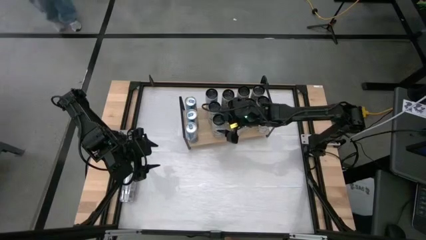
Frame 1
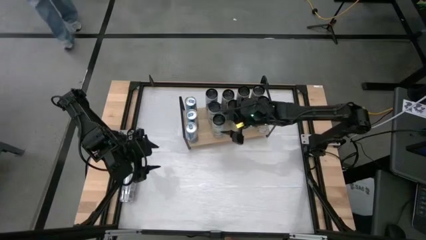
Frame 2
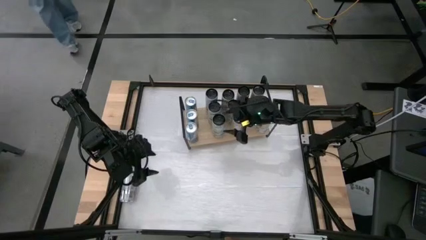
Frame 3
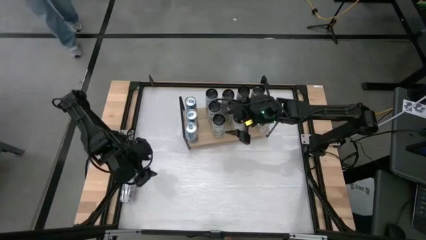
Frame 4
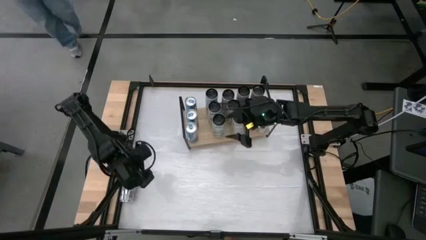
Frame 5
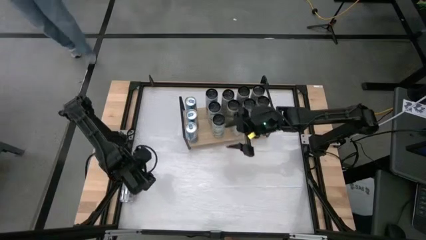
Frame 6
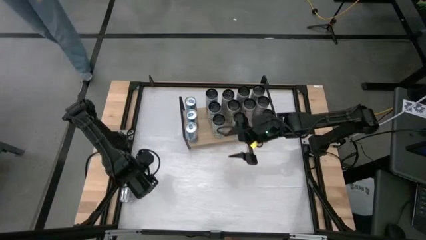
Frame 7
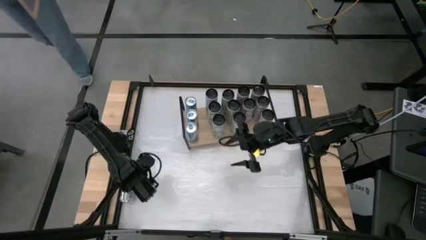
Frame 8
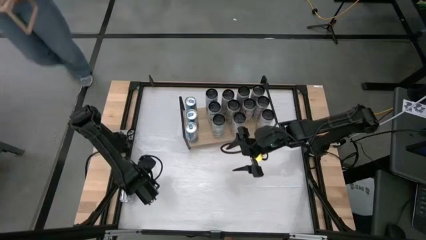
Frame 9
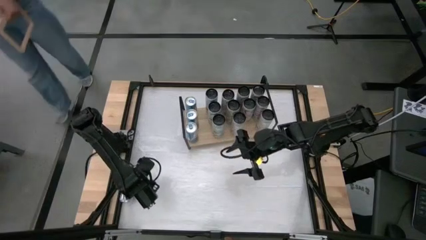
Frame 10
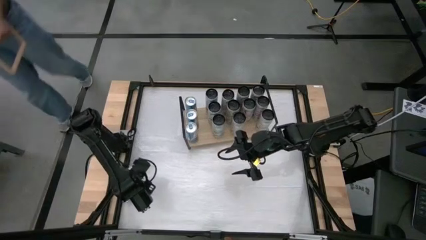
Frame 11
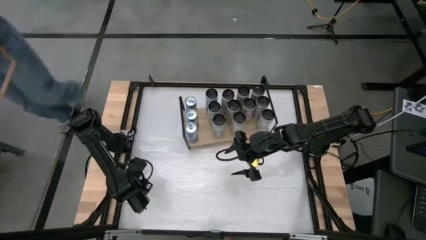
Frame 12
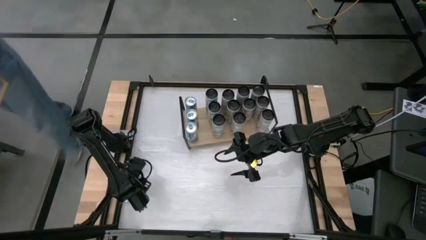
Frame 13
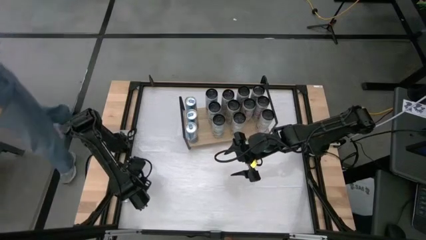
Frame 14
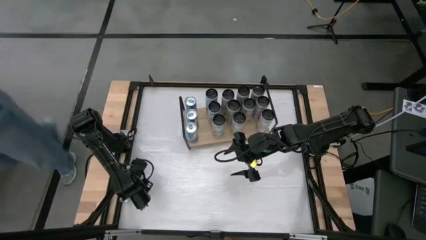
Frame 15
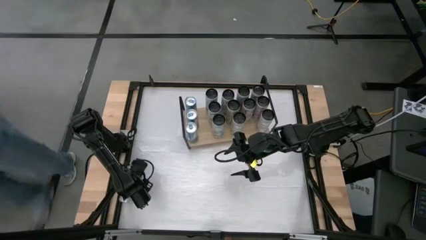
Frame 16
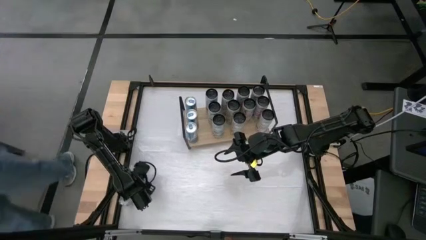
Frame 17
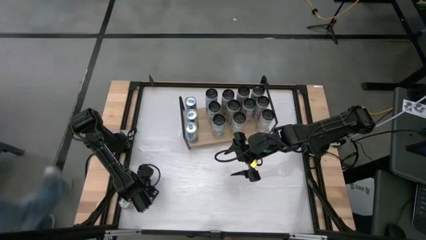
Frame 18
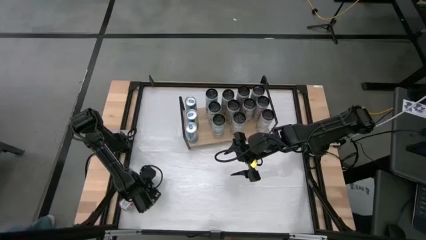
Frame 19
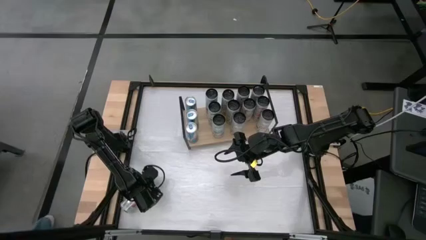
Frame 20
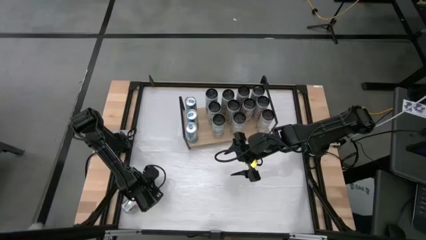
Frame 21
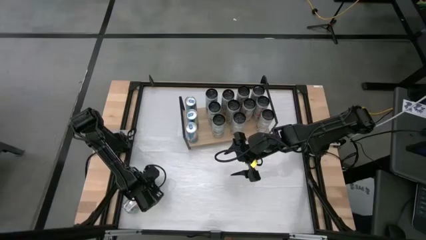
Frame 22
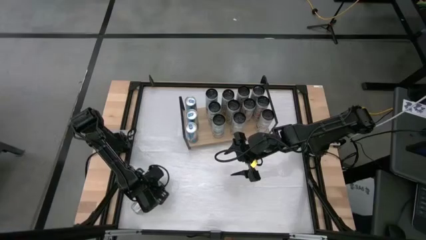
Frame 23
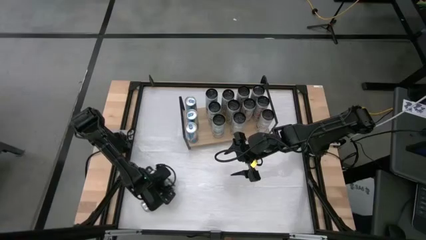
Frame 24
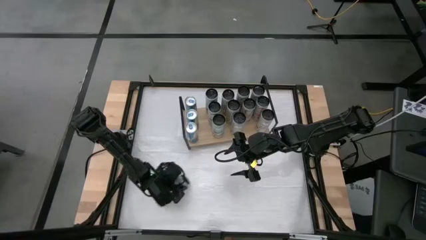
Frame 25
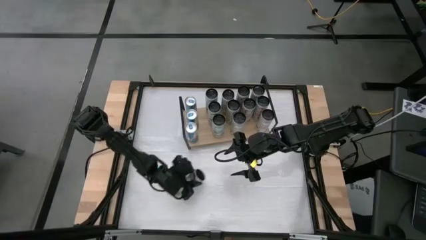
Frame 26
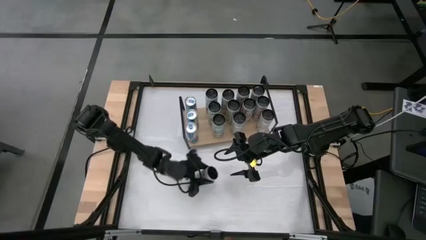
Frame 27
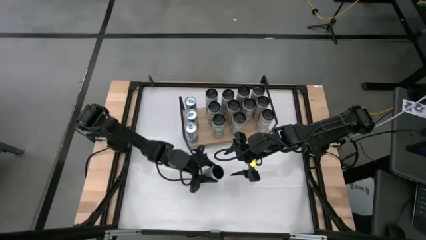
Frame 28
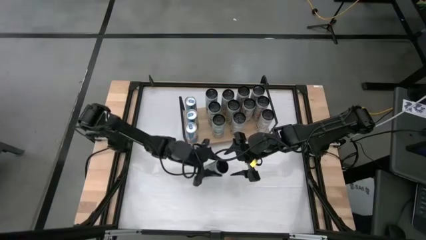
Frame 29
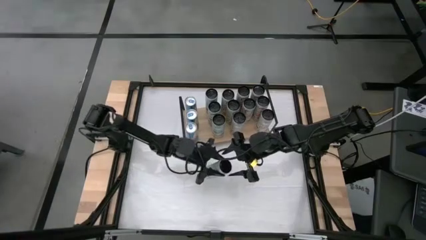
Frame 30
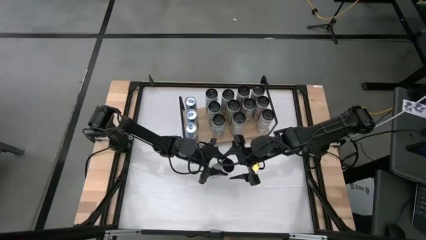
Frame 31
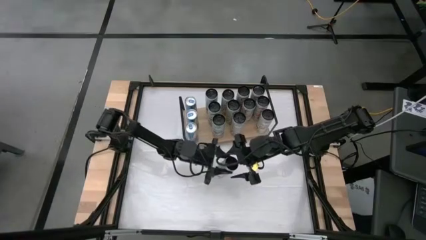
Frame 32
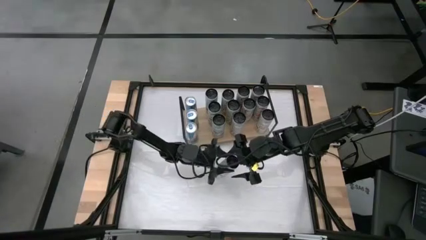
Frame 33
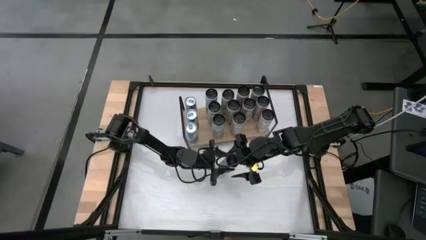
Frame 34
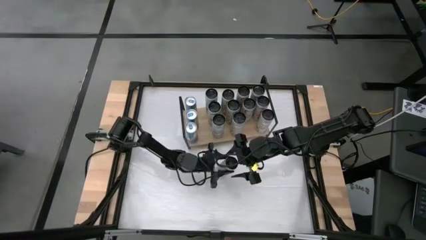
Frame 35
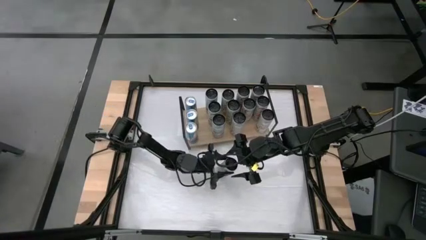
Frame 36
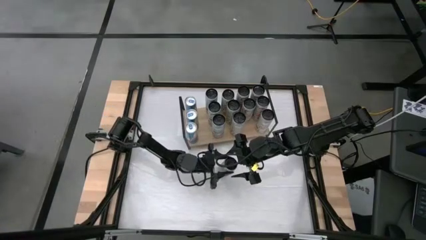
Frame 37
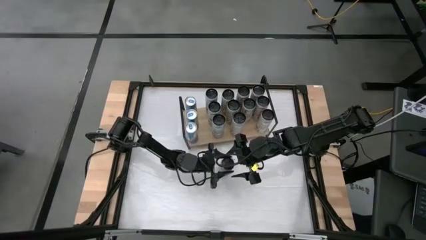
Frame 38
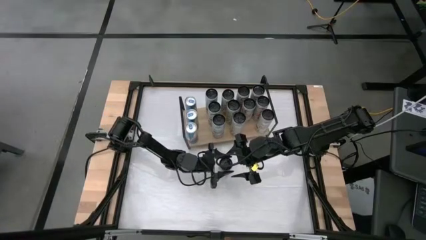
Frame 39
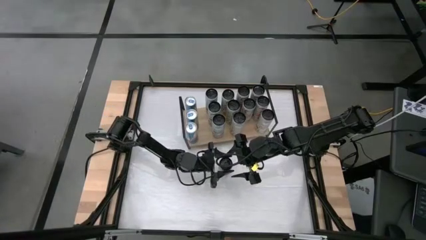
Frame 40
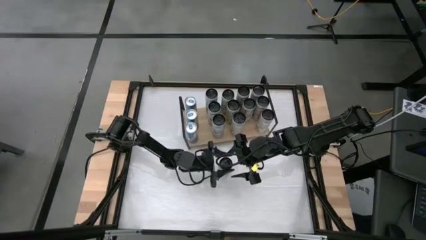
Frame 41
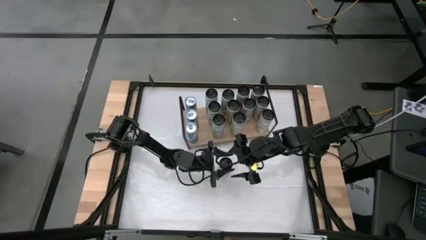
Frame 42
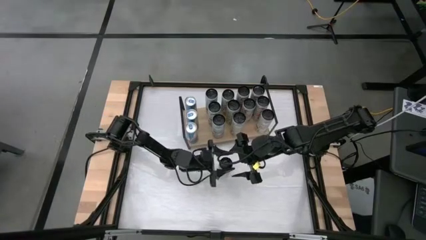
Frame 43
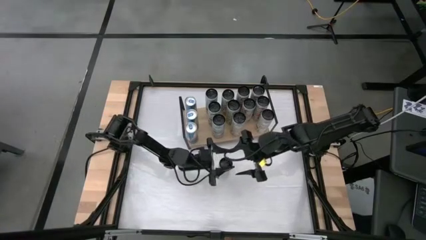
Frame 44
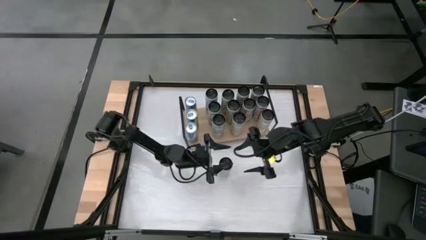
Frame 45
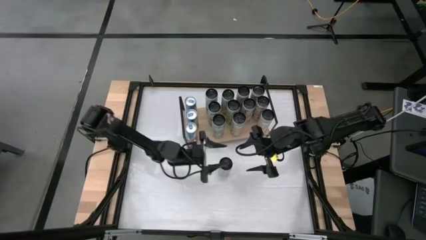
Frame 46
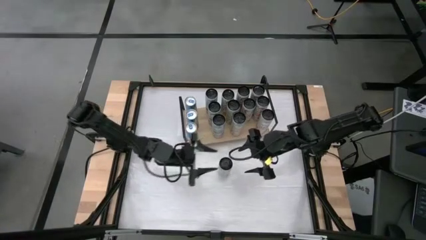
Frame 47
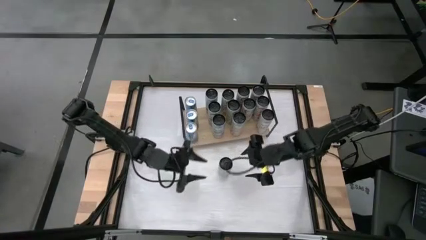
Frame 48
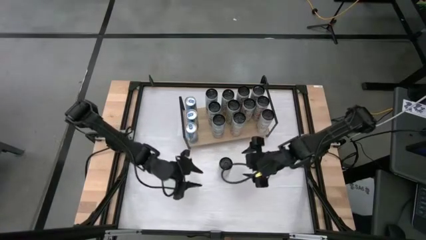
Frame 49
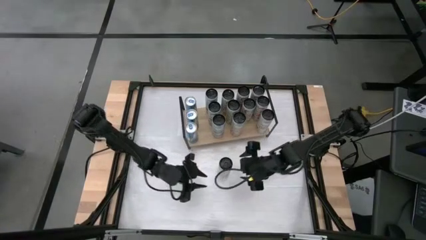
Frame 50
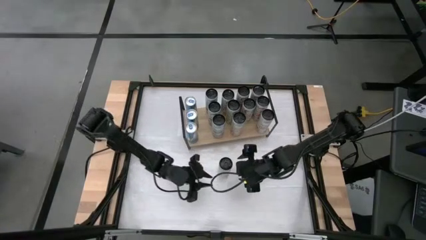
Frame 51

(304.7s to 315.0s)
Task: Place canned beverage on shelf
Put the white-pink soda can on the shelf aligned with the other white-pink soda can

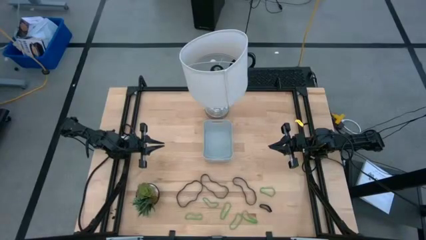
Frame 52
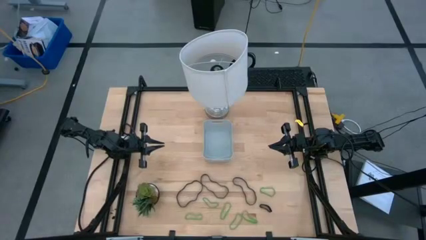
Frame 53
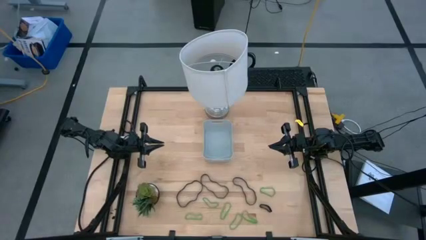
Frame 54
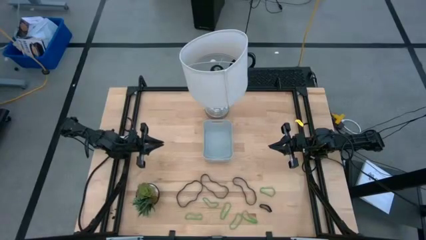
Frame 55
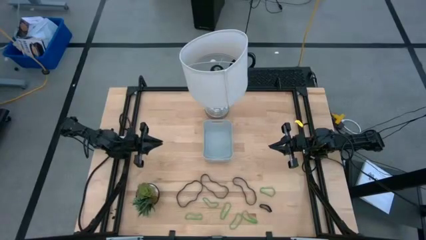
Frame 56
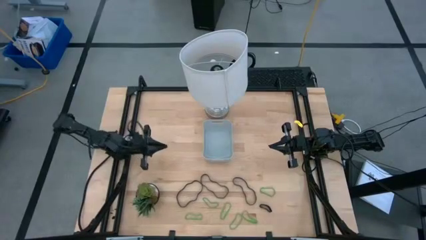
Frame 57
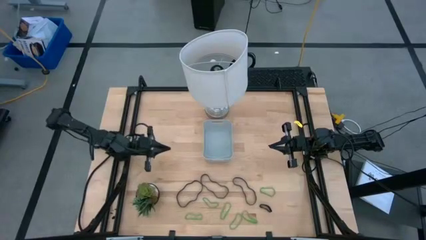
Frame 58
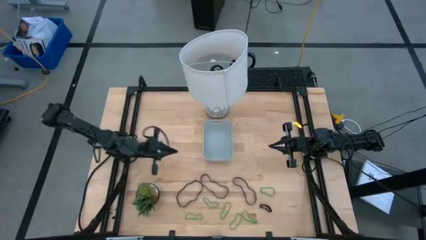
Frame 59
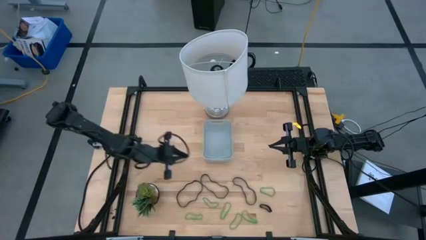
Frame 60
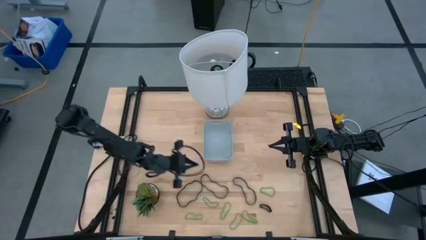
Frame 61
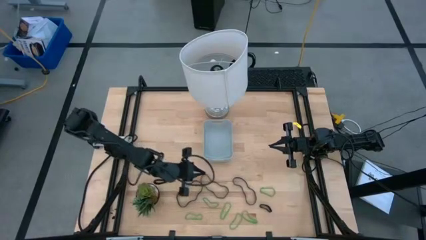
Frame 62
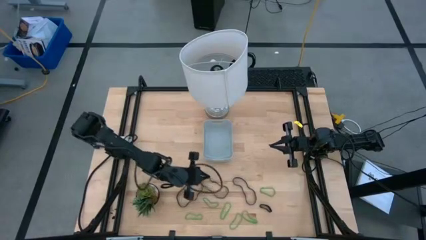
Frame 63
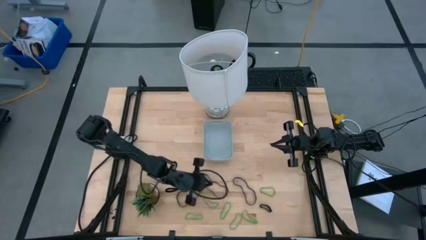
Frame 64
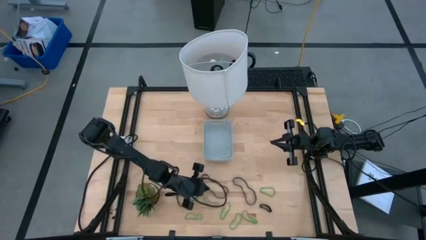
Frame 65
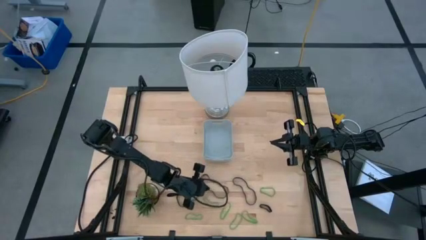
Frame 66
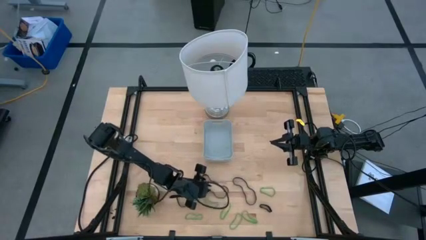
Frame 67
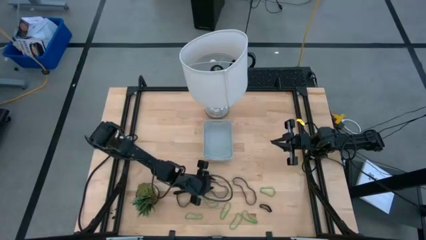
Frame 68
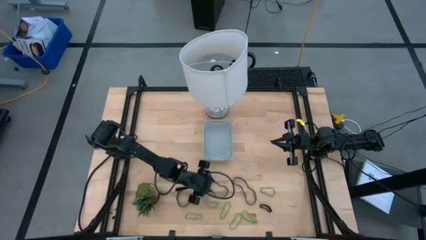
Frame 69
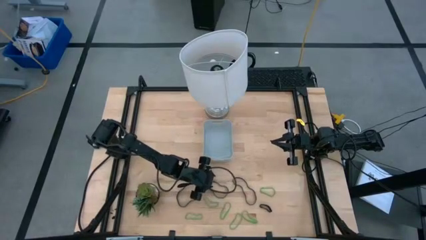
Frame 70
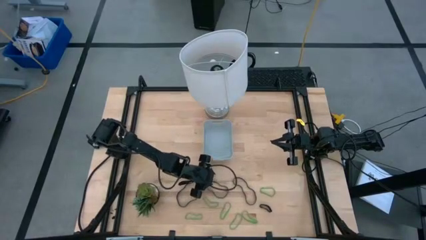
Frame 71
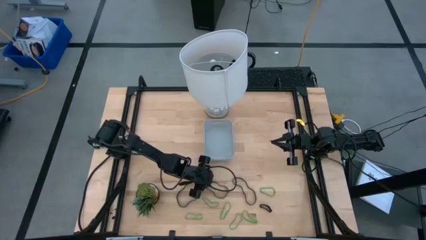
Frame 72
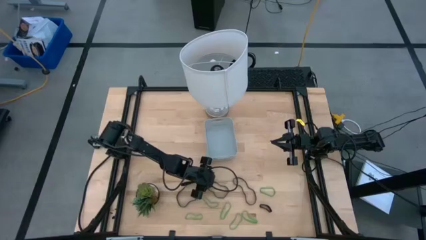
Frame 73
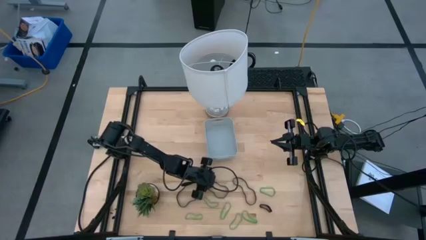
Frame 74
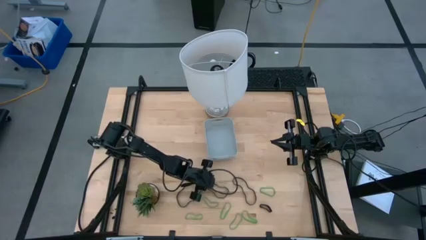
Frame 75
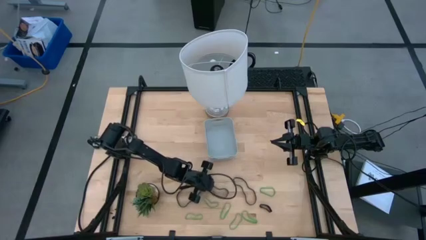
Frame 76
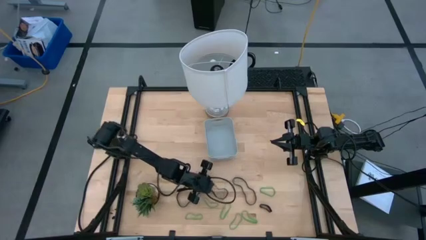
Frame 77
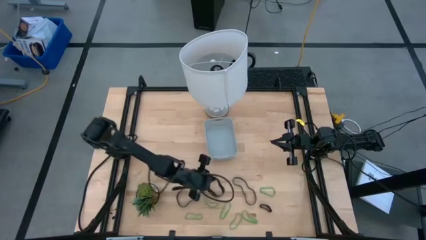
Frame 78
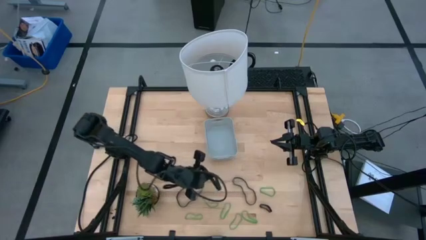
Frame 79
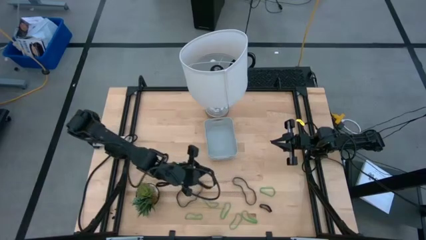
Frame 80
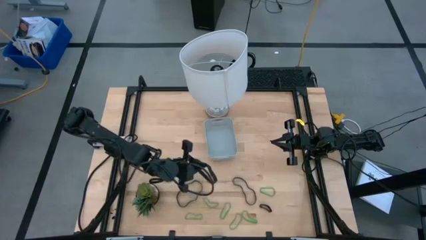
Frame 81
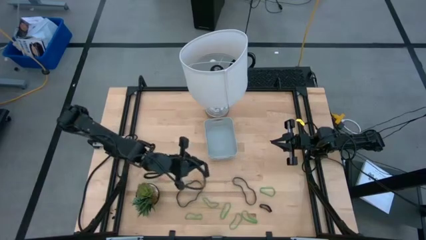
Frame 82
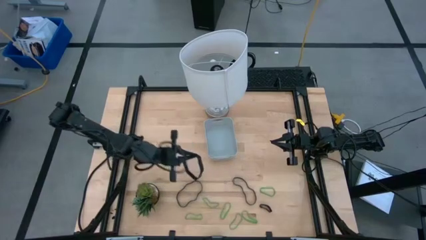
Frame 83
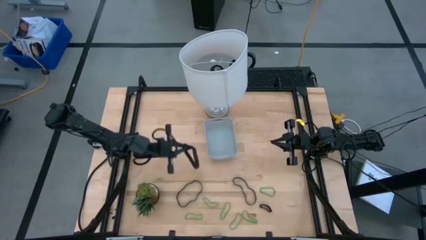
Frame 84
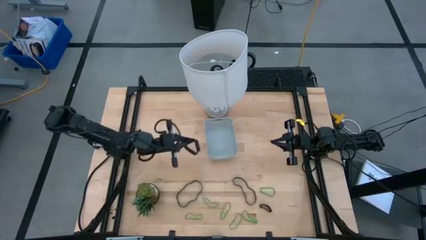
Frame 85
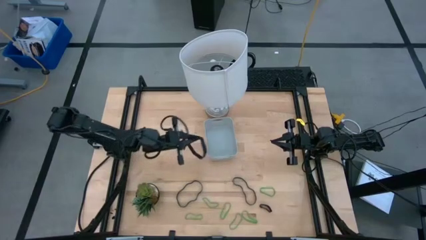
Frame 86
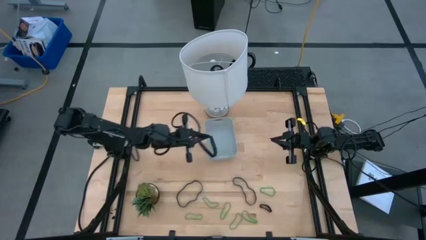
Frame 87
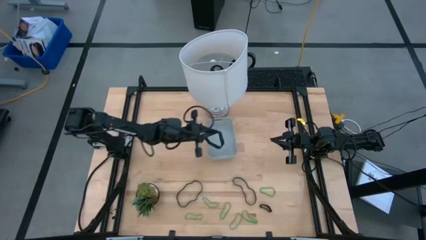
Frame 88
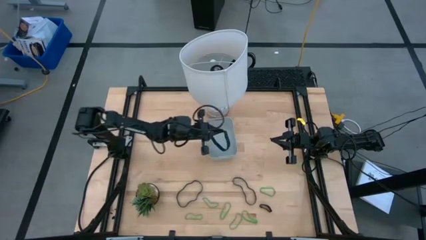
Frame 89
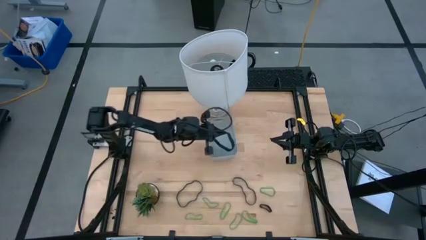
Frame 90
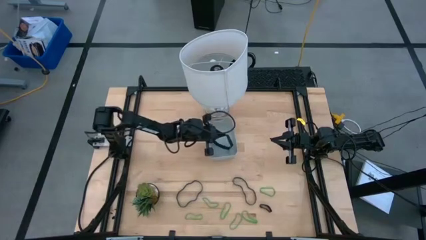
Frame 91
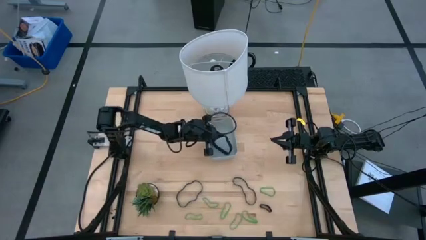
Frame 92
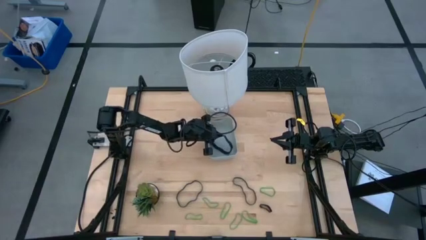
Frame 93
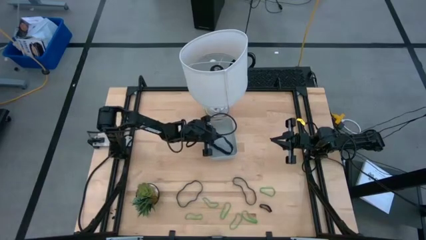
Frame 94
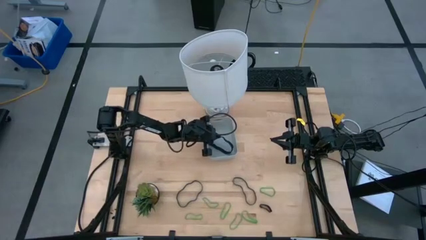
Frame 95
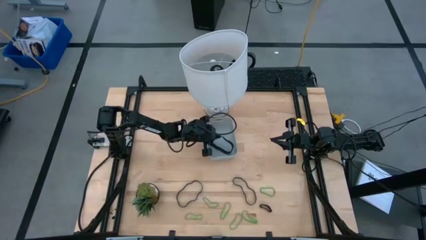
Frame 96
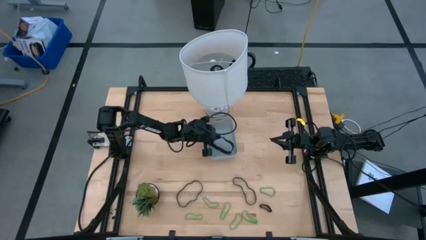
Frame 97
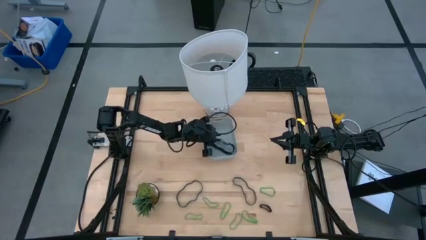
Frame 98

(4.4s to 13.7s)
Task: Pick and place rubber bands into bin
Put the black rubber band into the gray bin
